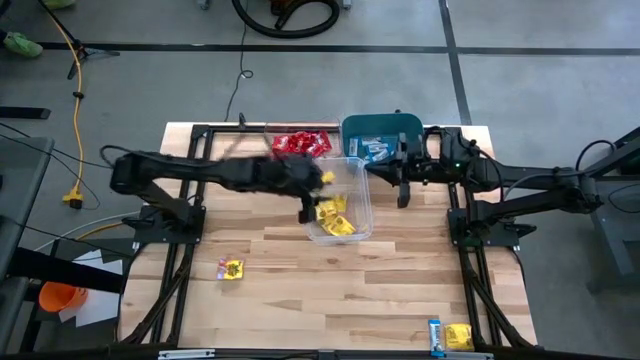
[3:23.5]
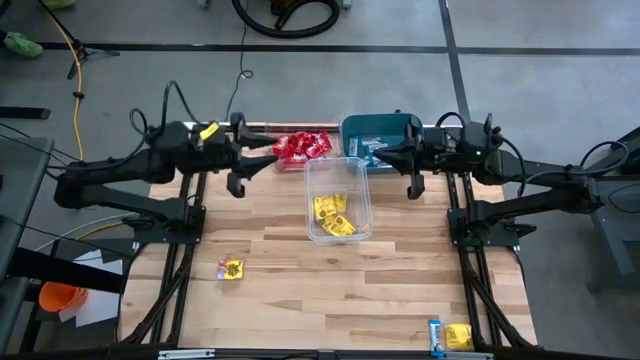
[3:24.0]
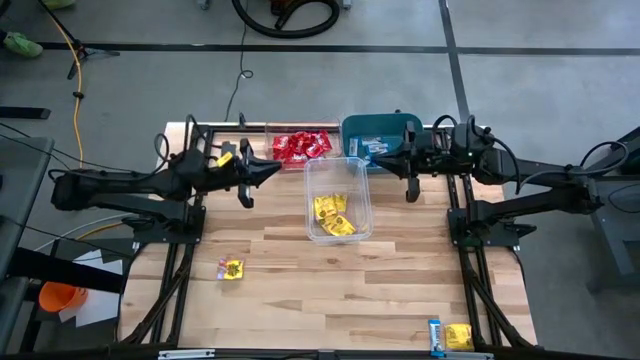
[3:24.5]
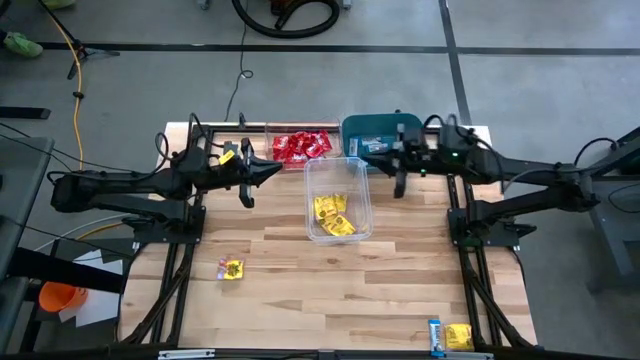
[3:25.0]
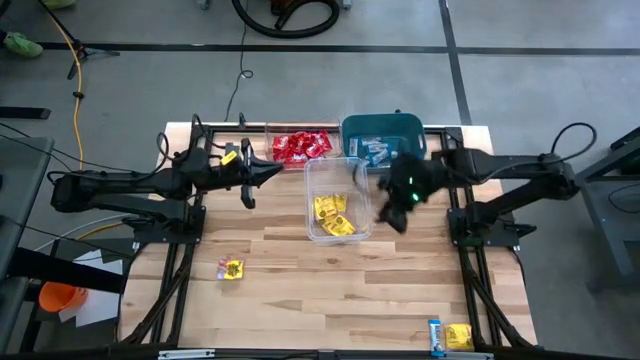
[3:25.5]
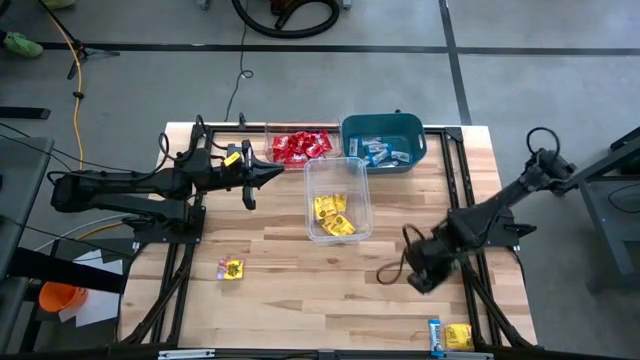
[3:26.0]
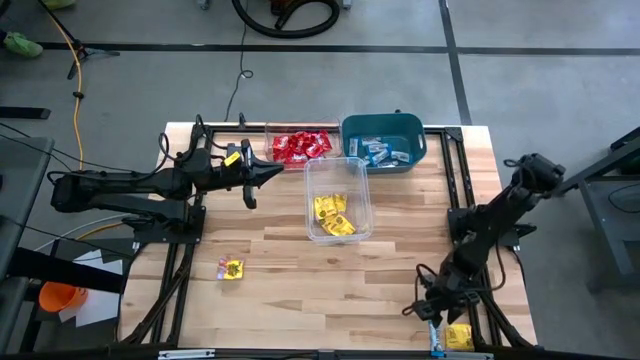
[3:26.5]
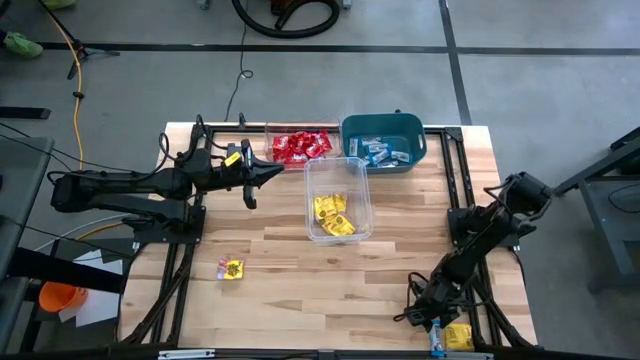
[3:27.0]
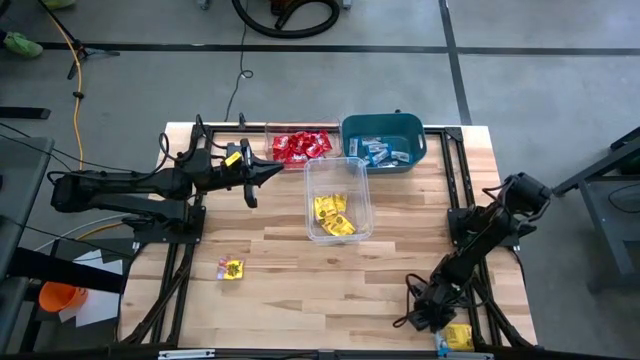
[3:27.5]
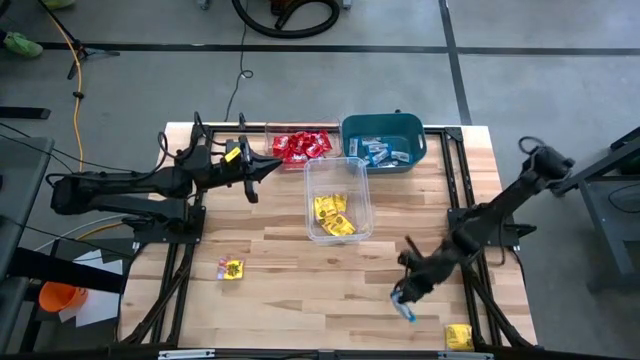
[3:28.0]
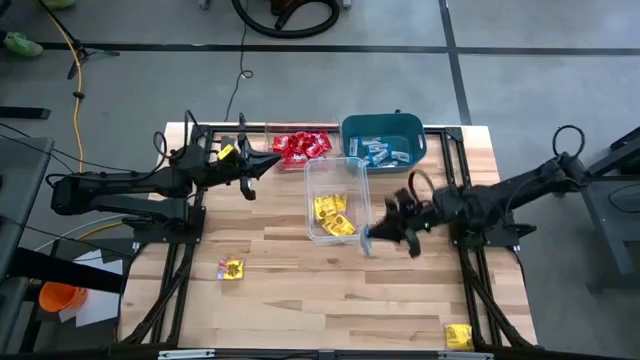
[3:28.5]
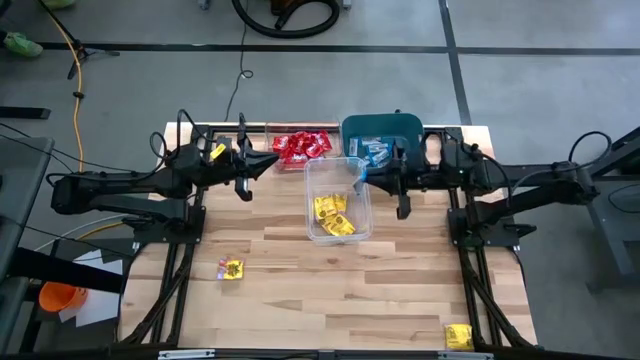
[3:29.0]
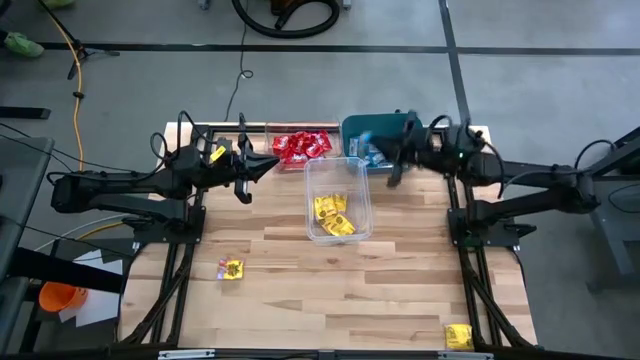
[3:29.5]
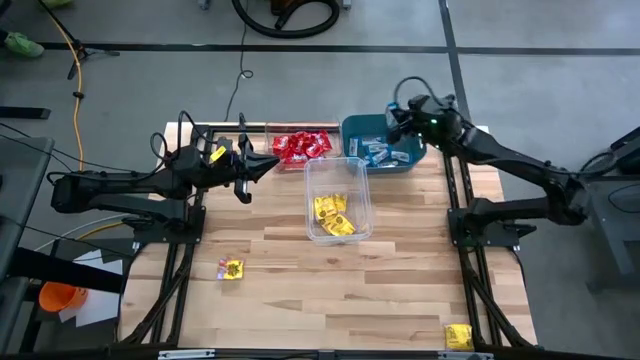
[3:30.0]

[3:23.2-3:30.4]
Task: Sort candy
Put the white chocolate into the blue bin

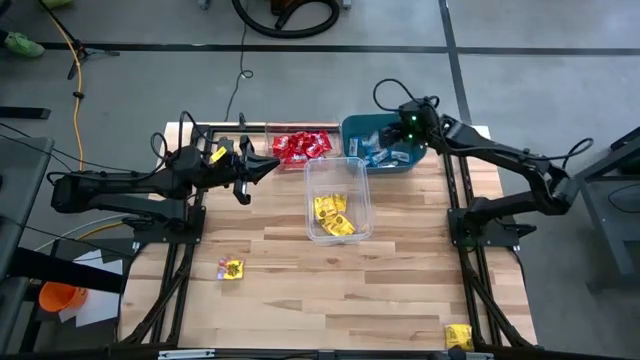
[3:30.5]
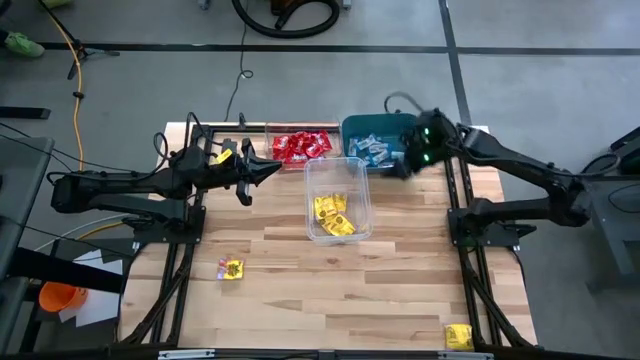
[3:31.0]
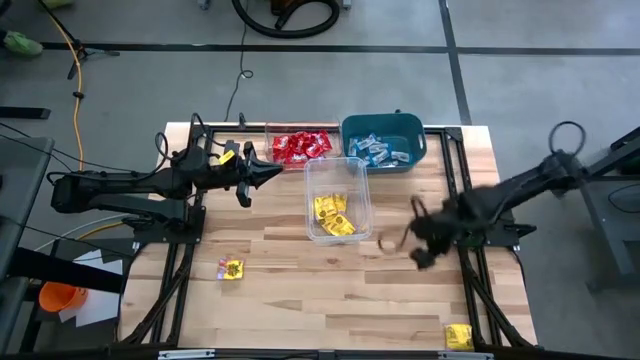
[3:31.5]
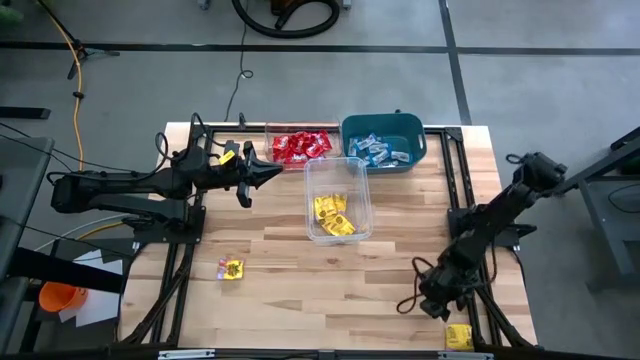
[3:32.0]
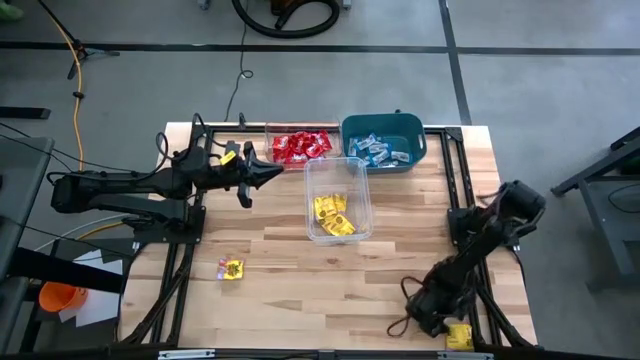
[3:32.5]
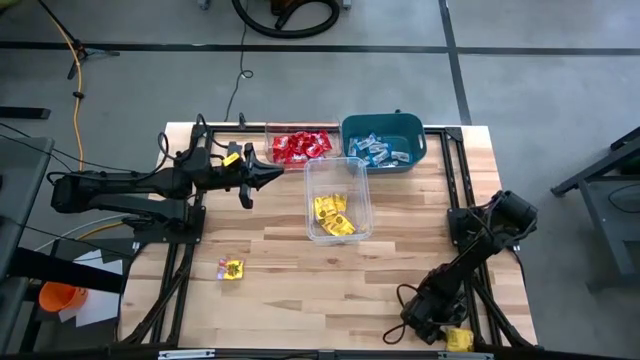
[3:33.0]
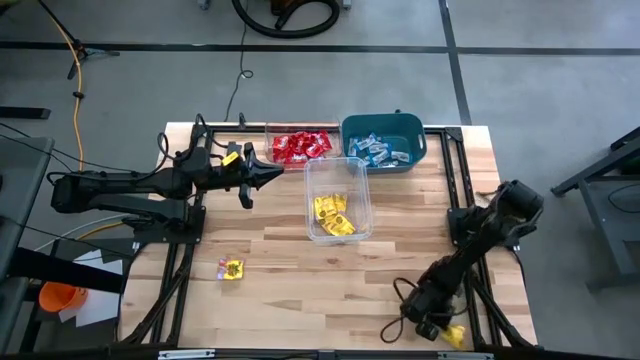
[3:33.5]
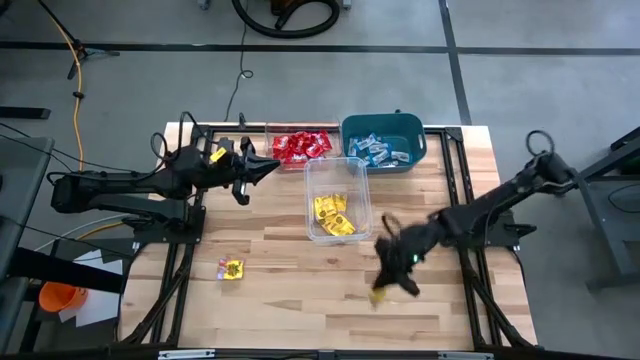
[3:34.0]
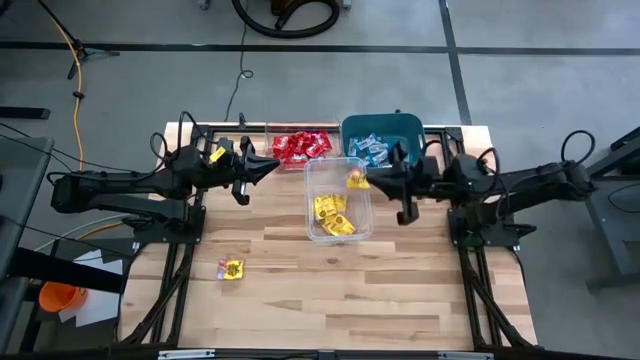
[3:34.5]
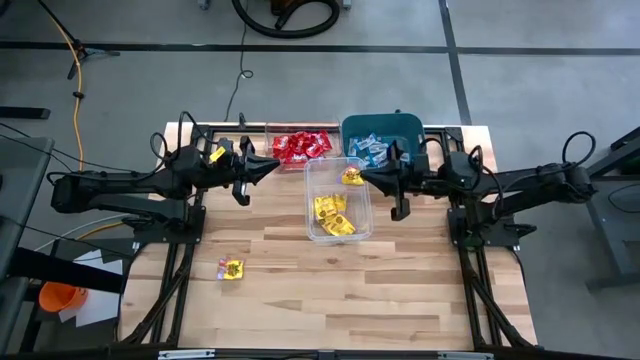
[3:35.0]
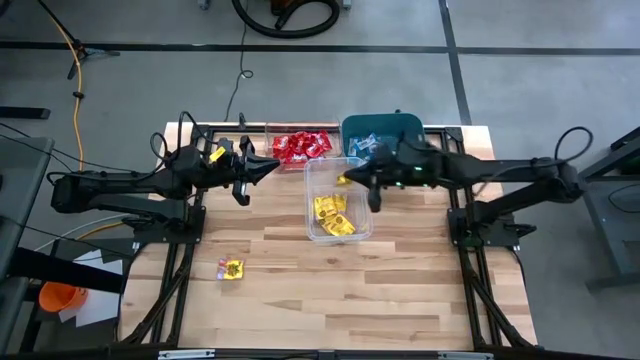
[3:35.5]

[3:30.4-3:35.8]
Put the yellow candy into the transparent container

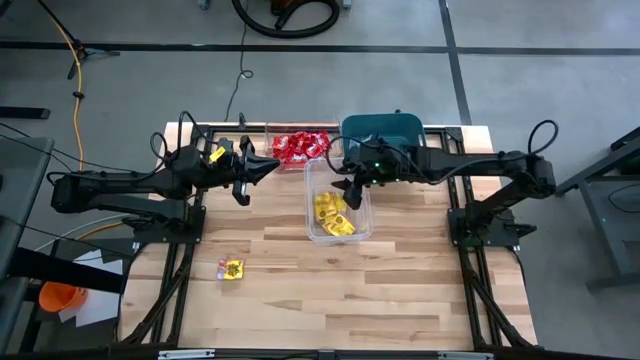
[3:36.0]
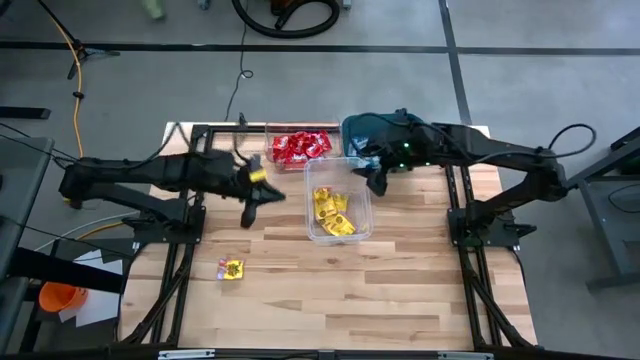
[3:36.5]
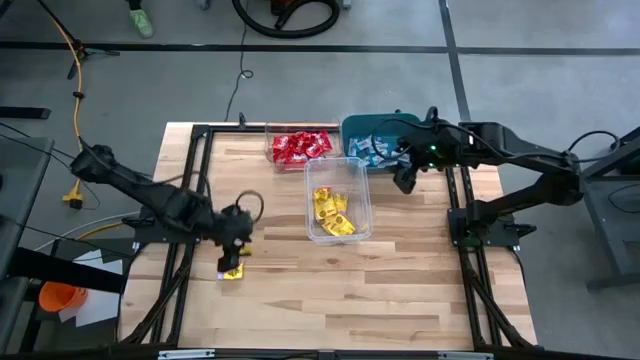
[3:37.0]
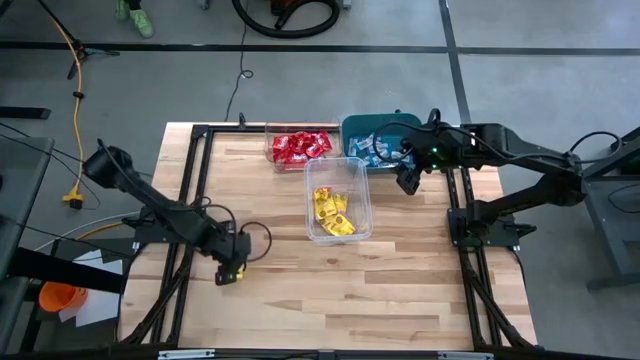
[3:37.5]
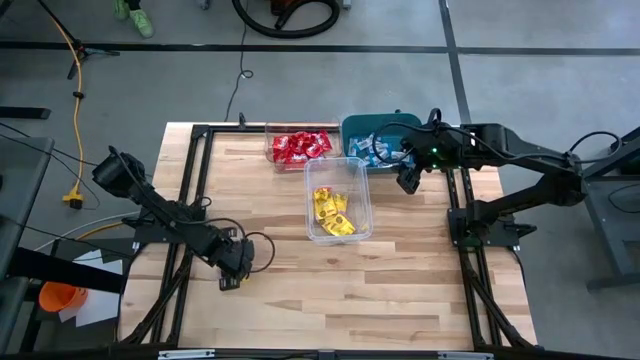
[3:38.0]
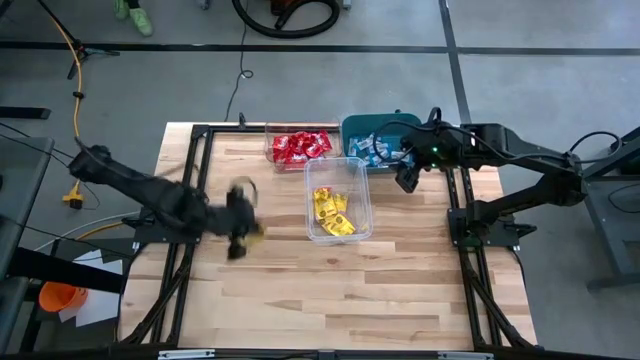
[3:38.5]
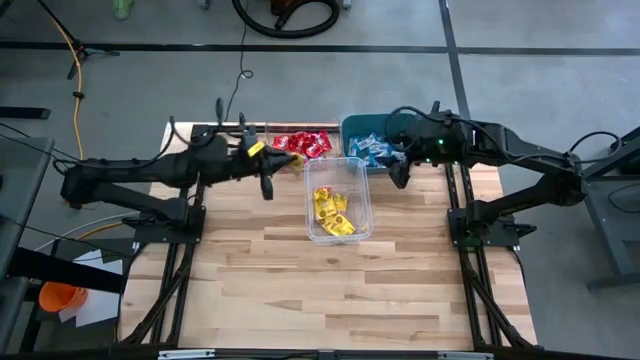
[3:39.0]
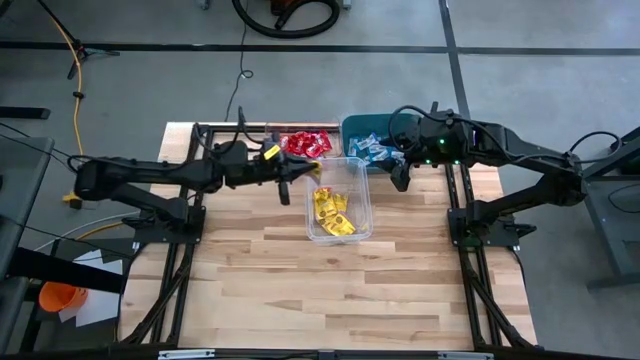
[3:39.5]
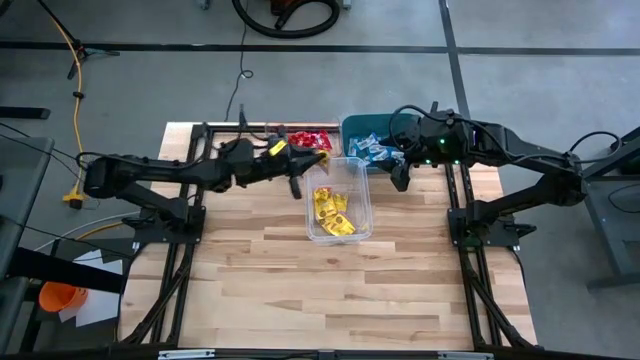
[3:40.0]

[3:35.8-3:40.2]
Put the yellow candy into the transparent container

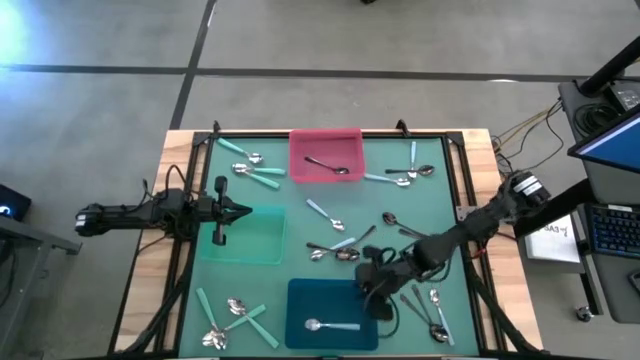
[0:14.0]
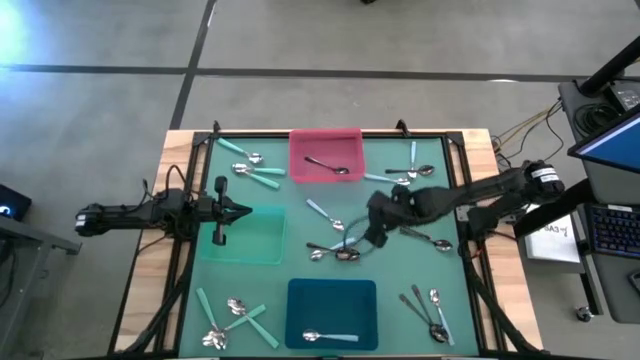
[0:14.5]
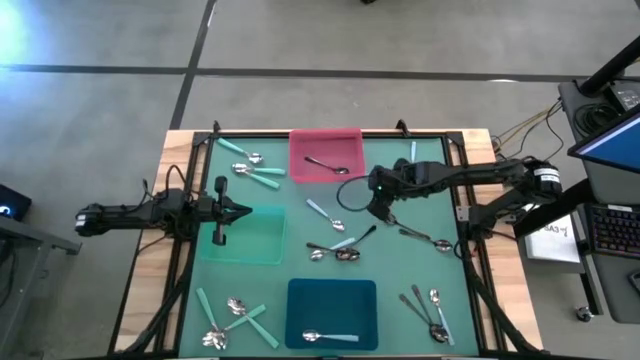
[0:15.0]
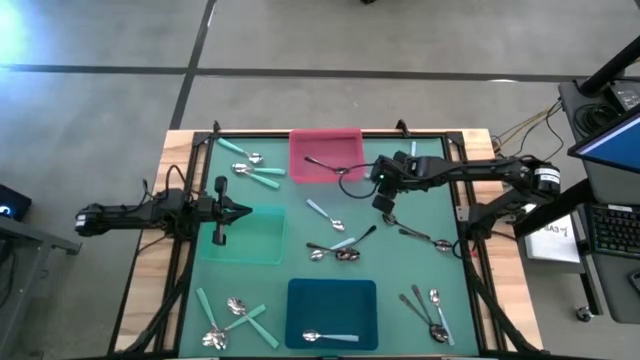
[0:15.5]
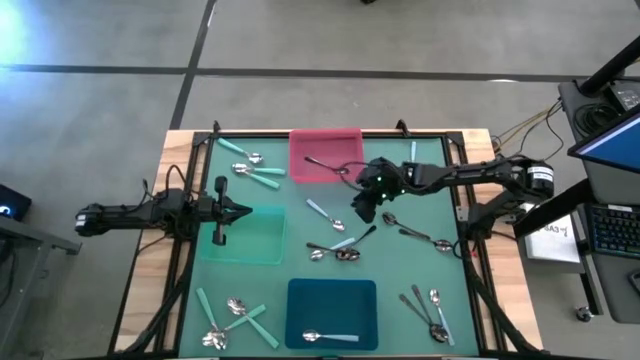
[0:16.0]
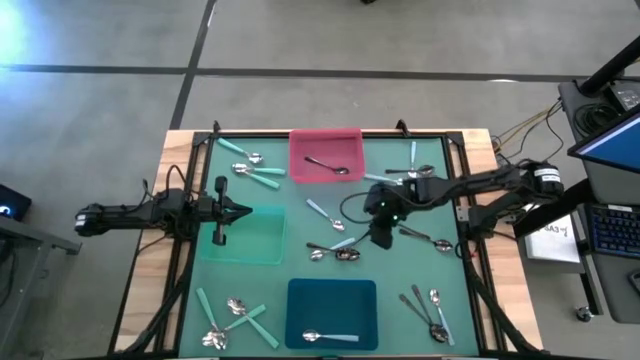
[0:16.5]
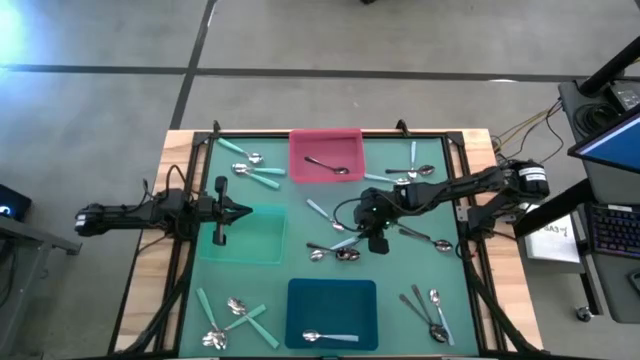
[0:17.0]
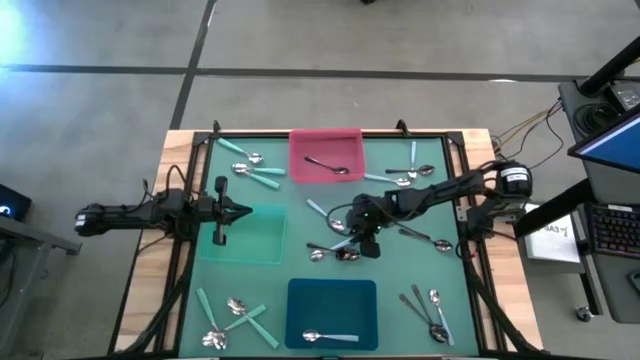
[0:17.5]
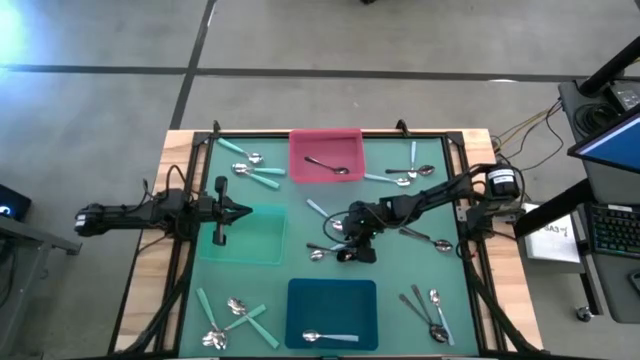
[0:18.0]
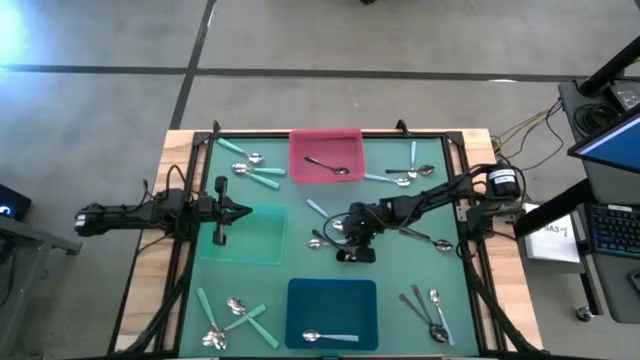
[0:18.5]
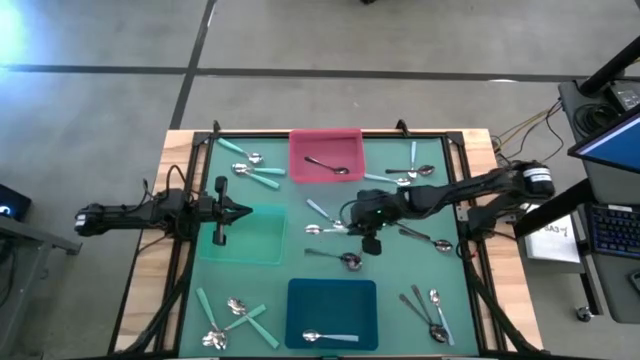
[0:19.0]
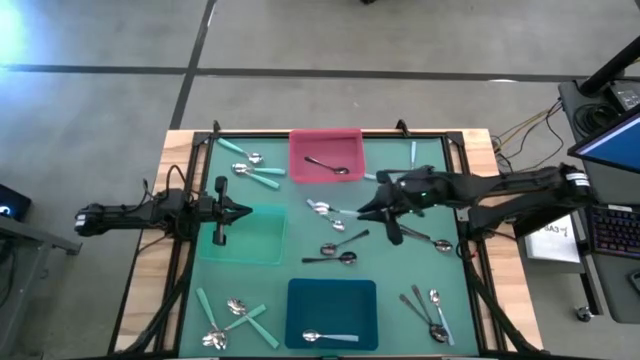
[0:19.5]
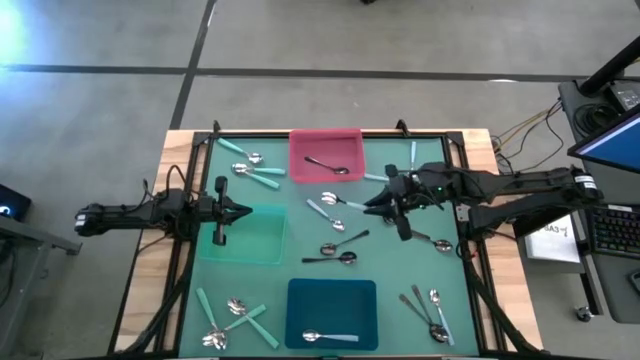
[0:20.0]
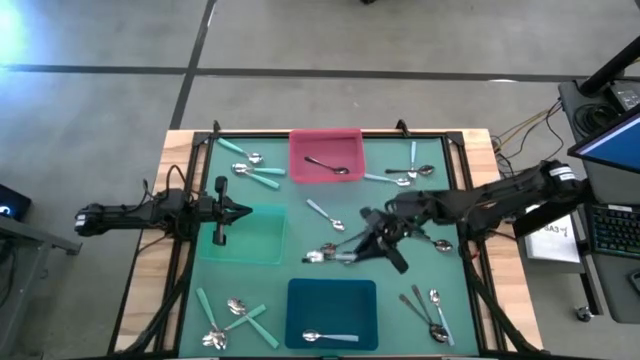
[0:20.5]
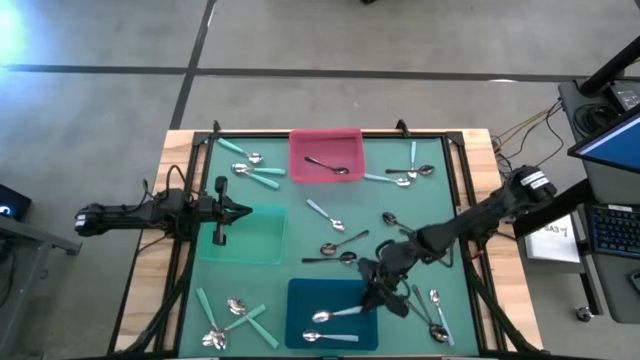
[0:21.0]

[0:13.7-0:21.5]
Task: Sort silverware by color (type)
Put the blue spoon into the blue bin
